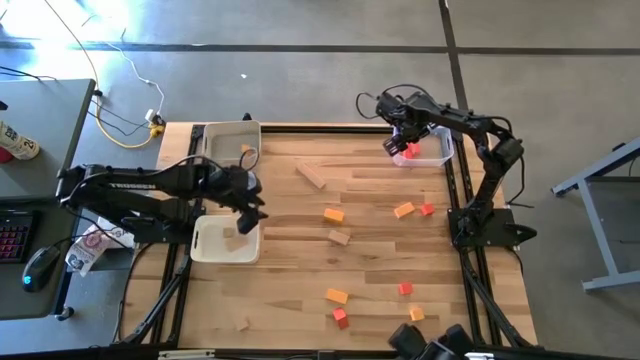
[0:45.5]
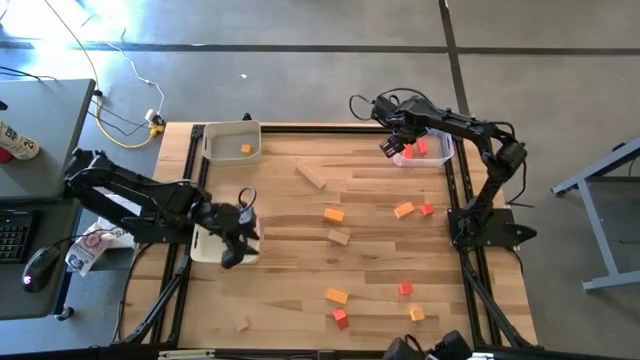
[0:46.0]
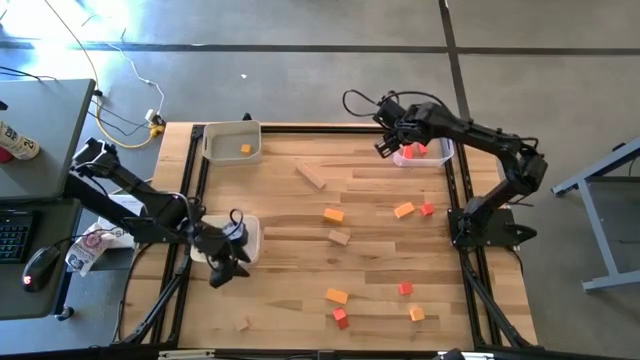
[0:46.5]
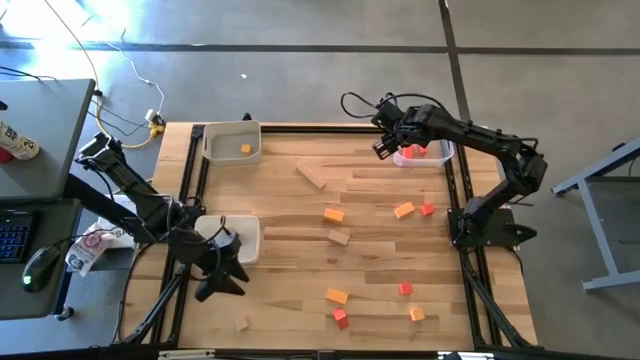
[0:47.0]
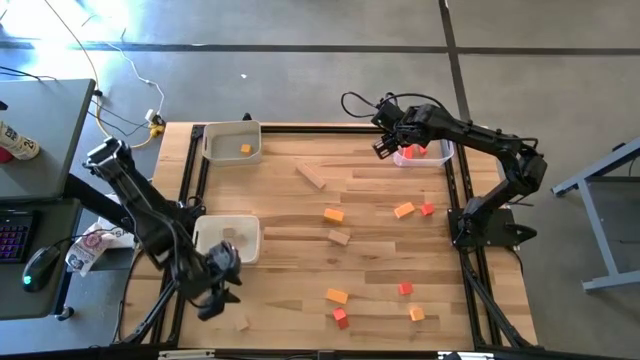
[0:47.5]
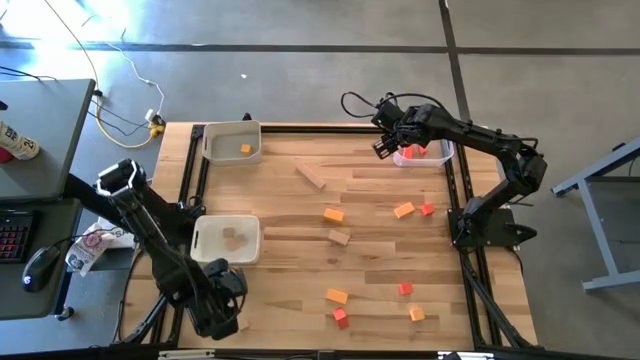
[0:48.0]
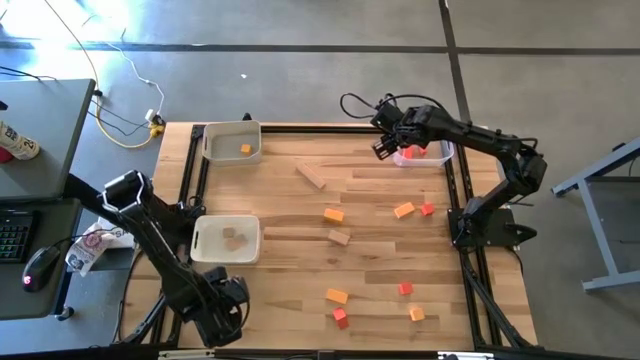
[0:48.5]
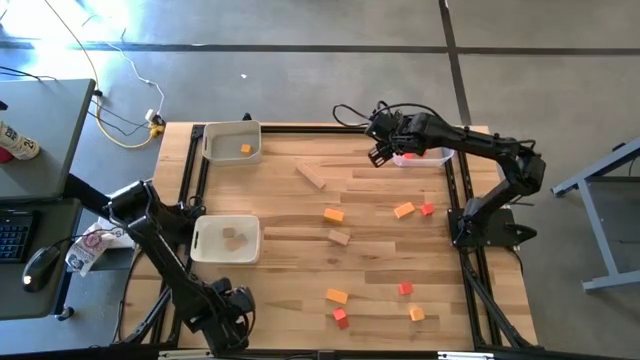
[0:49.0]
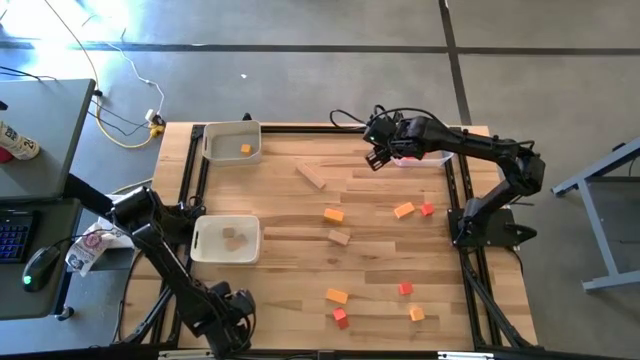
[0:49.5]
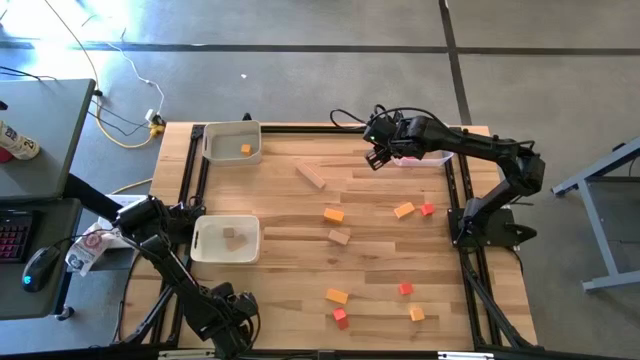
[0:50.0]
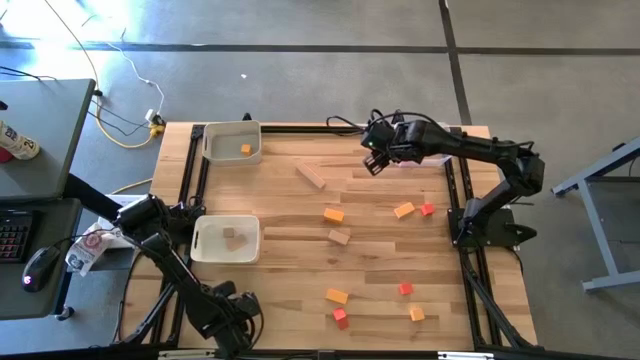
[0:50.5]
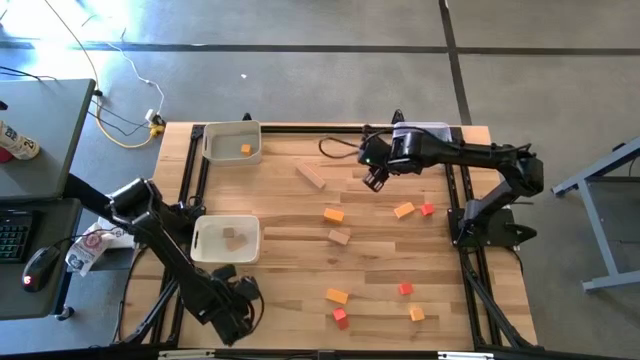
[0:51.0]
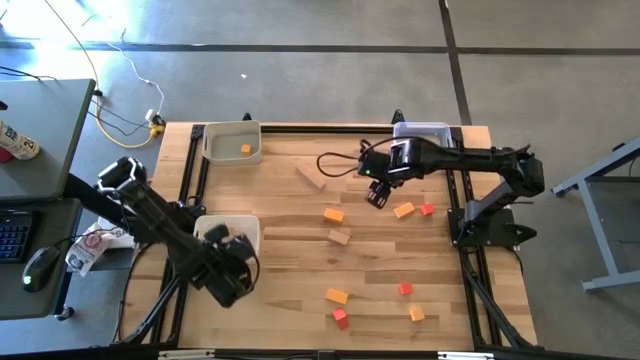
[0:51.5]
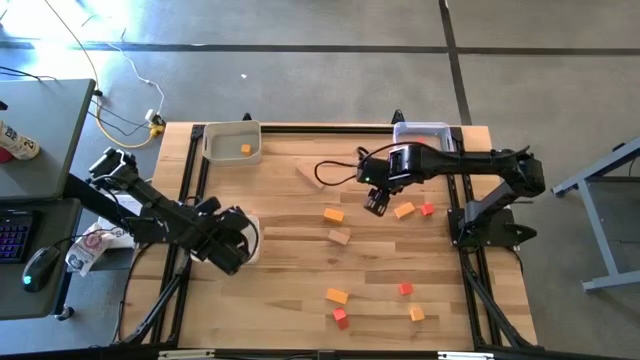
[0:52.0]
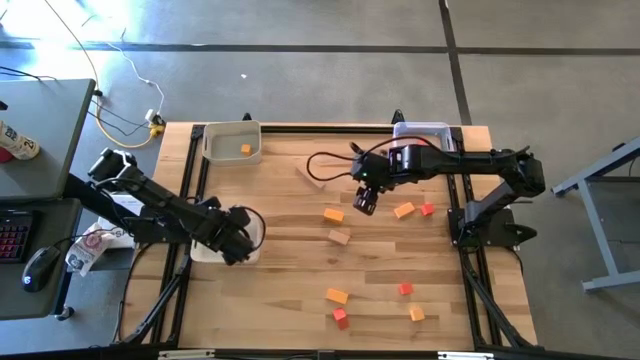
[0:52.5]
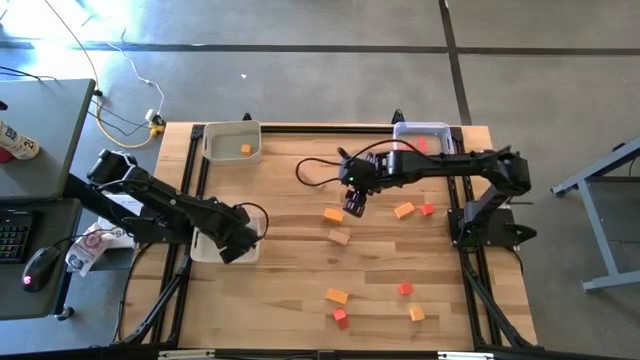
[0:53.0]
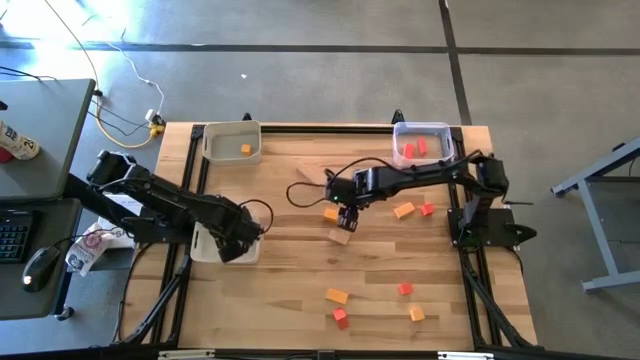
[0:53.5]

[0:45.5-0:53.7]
Task: Sort & place blocks by color
Put the brown block into the white bin

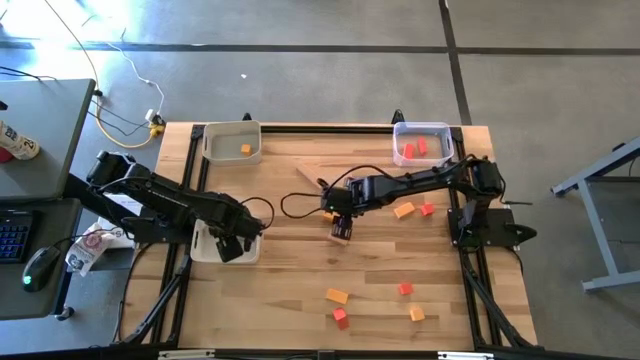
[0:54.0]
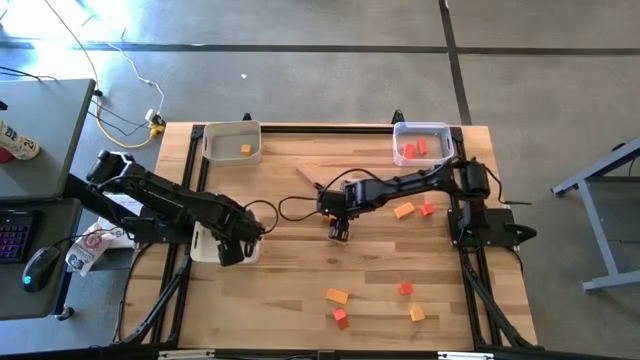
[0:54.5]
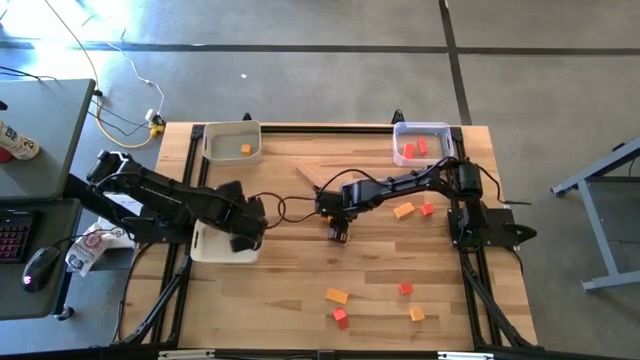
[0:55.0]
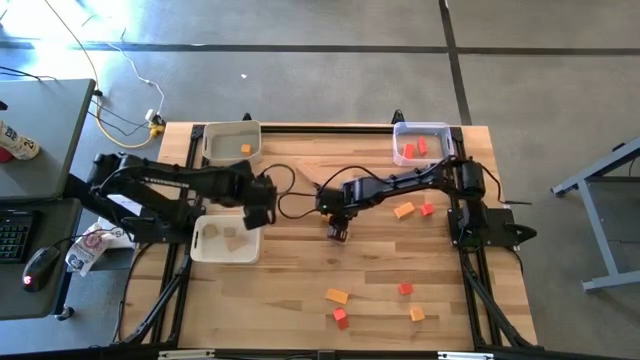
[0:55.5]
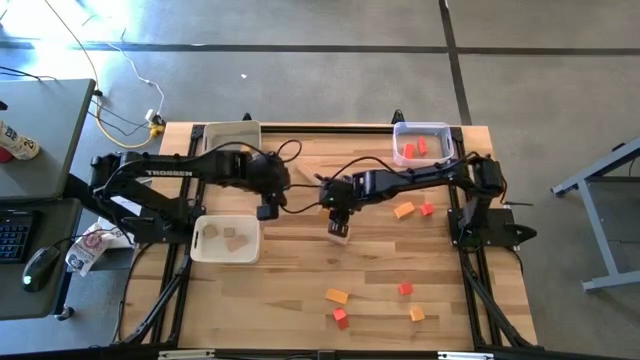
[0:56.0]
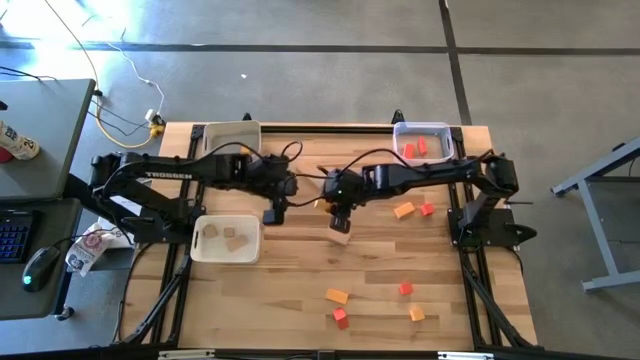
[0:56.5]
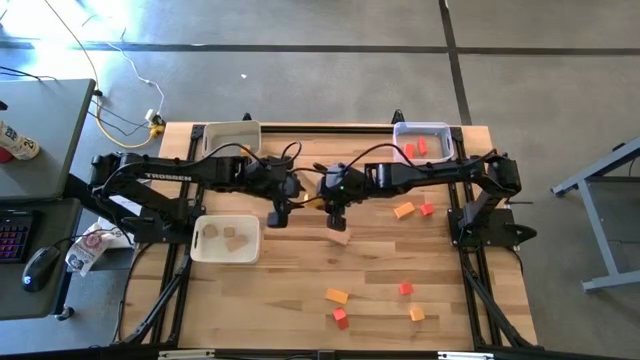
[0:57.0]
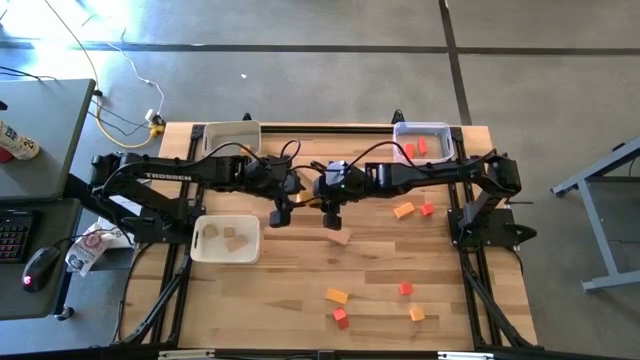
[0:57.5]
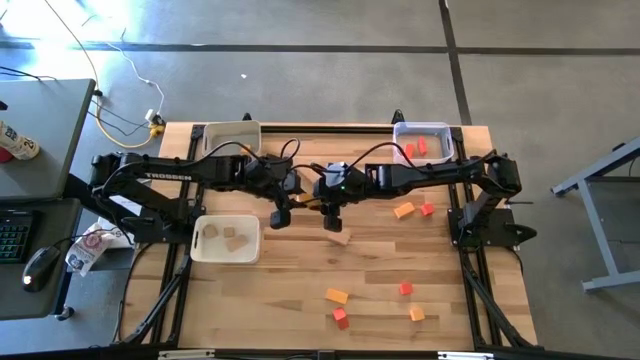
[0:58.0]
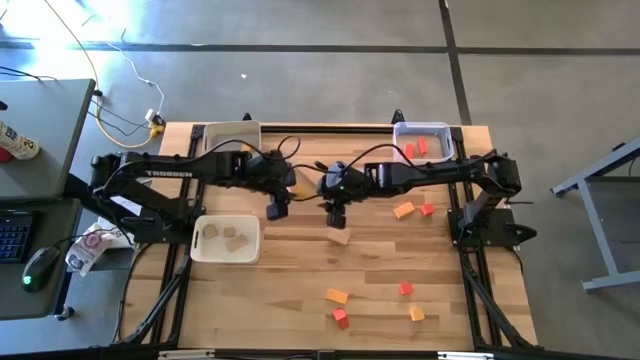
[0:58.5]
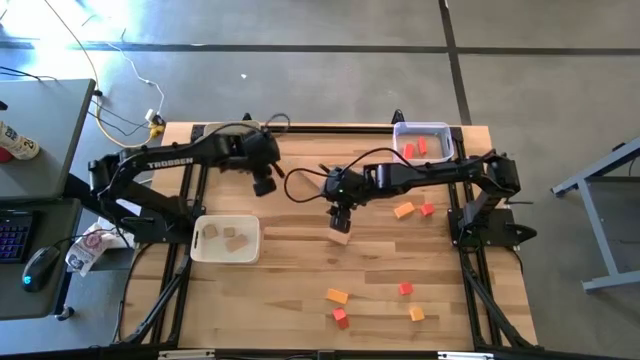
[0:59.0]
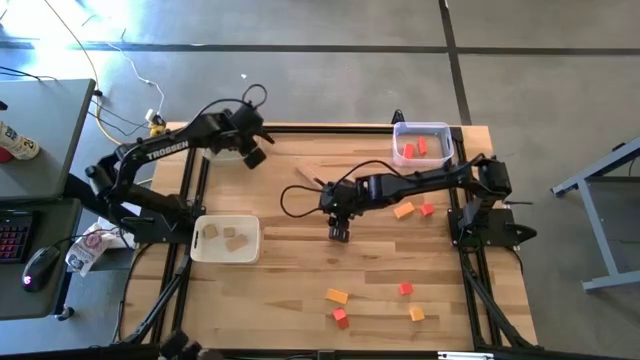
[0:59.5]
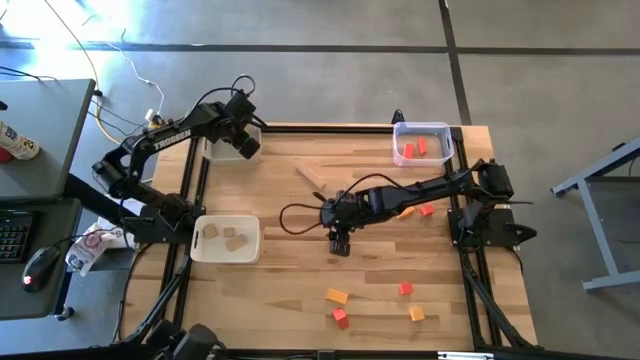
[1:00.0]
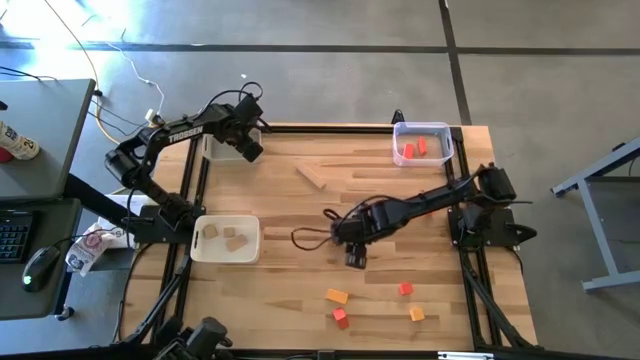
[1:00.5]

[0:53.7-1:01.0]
Put the yellow block into the gray bin

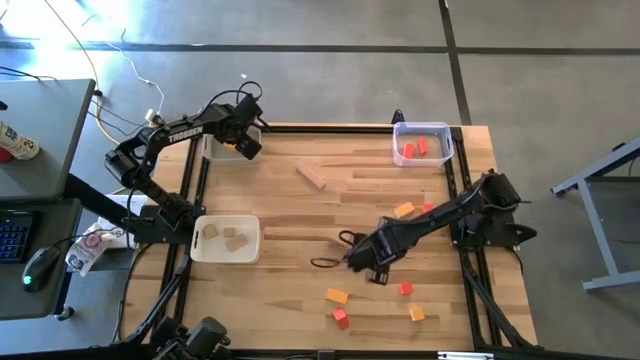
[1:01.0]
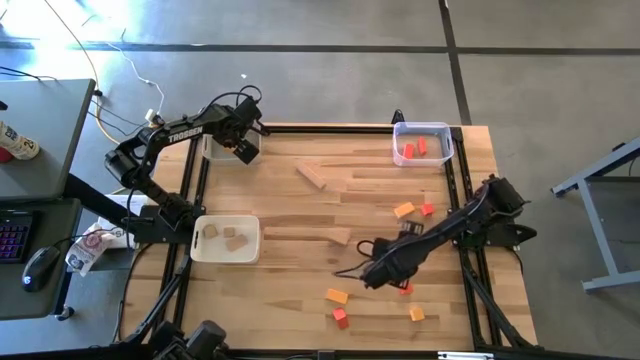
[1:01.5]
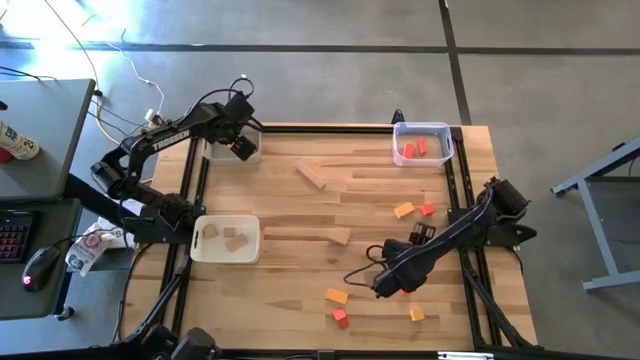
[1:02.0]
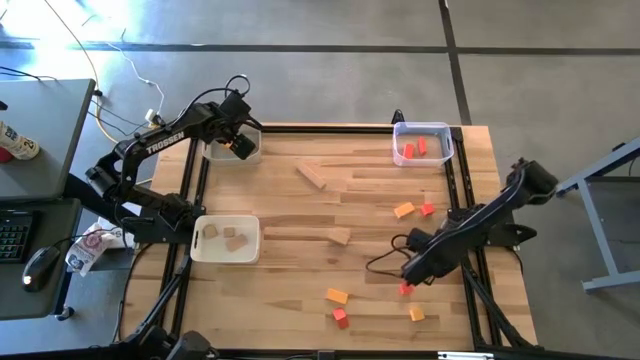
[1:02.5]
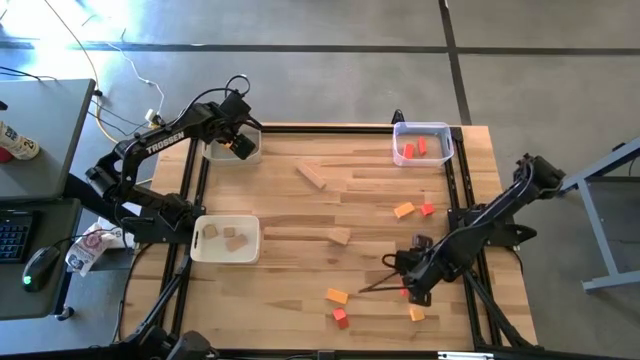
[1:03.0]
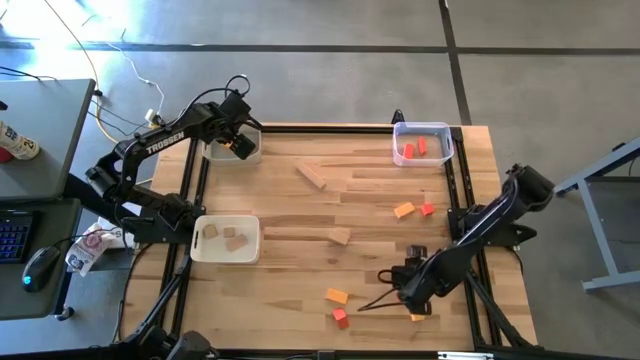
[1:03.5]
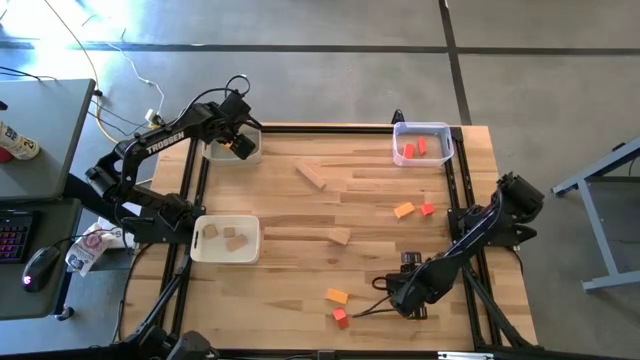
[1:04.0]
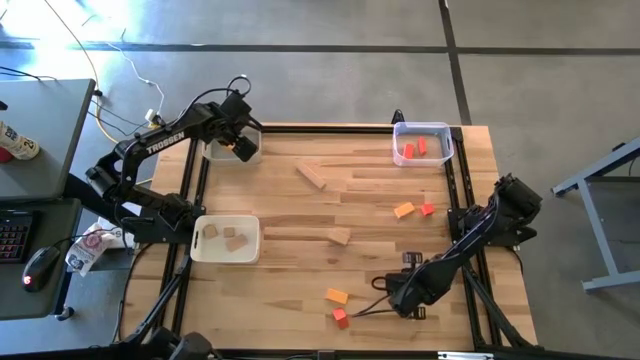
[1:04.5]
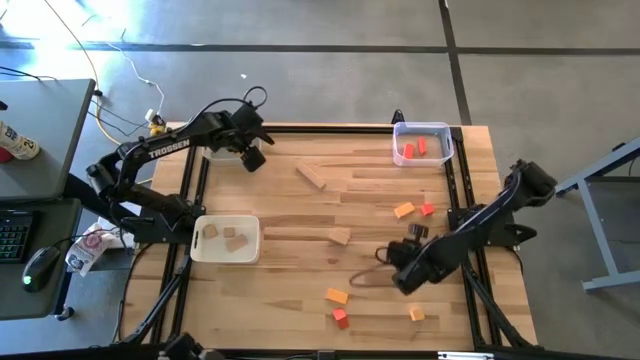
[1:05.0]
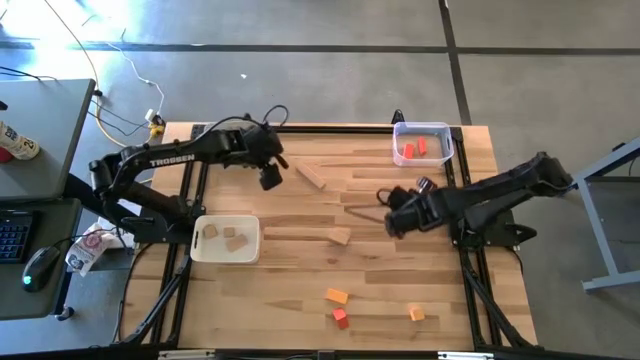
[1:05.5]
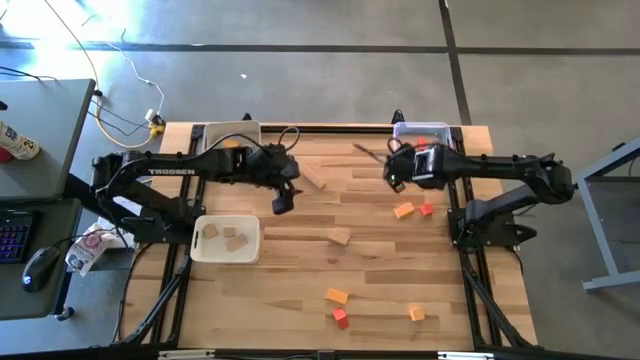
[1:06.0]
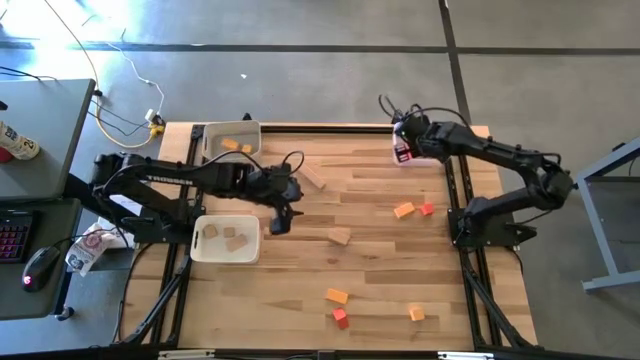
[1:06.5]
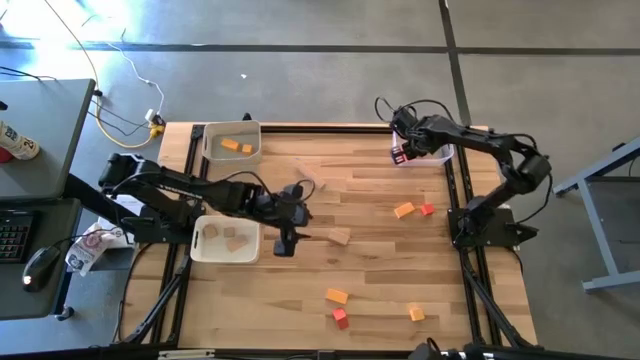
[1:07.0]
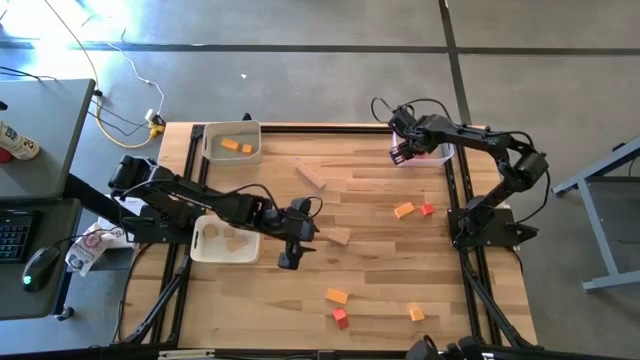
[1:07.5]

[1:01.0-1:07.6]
Put the orange block into the transparent bin
